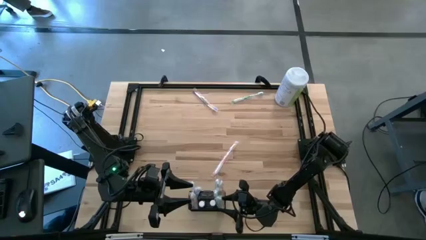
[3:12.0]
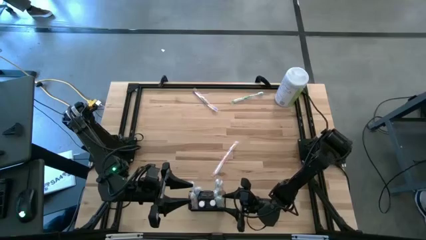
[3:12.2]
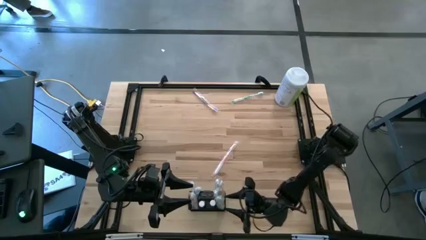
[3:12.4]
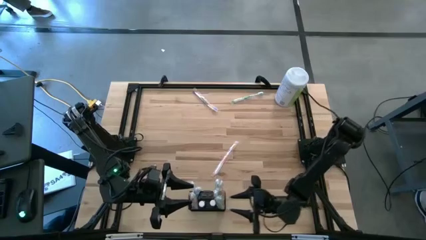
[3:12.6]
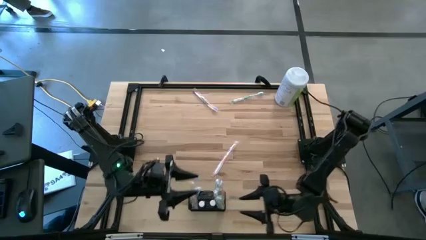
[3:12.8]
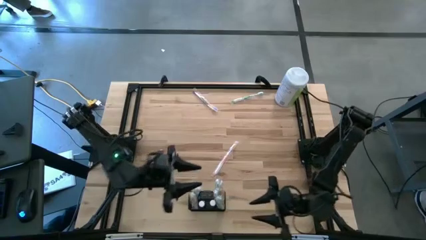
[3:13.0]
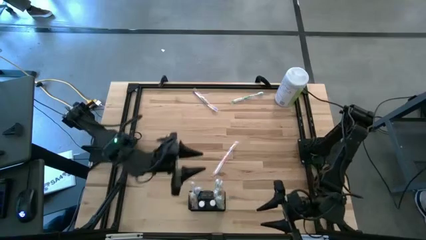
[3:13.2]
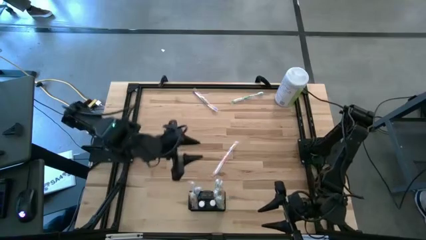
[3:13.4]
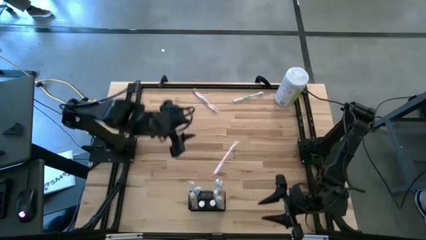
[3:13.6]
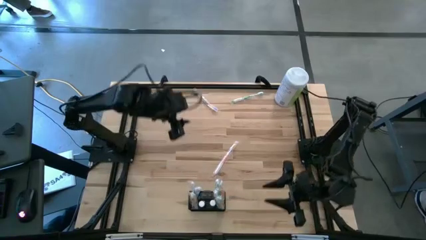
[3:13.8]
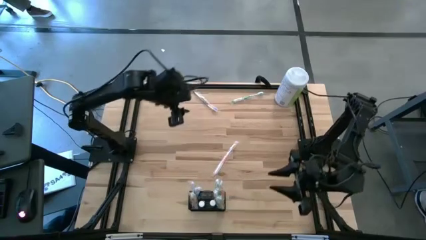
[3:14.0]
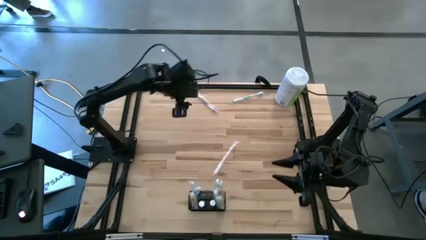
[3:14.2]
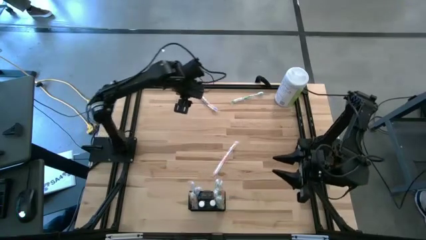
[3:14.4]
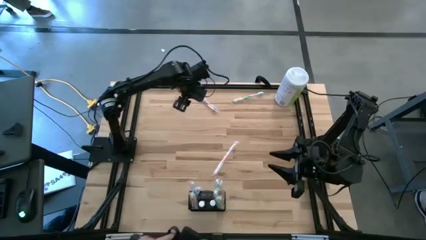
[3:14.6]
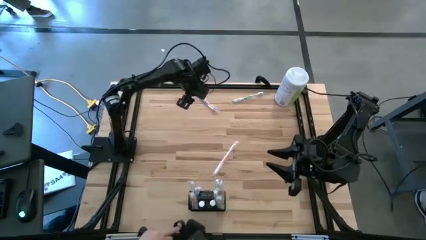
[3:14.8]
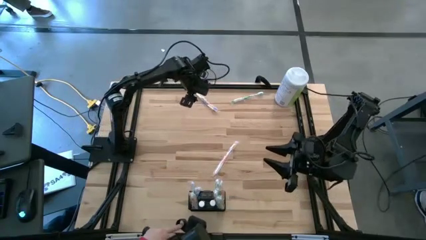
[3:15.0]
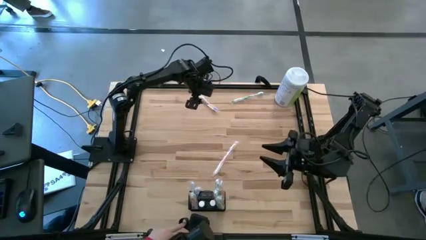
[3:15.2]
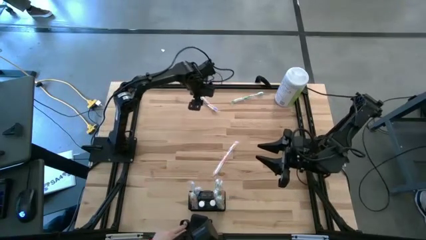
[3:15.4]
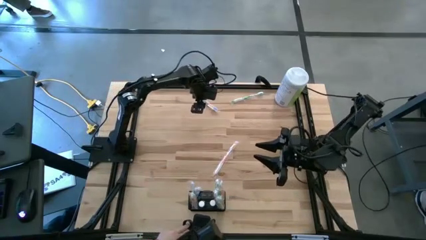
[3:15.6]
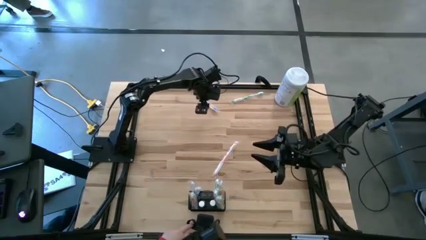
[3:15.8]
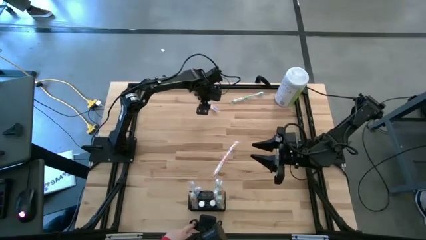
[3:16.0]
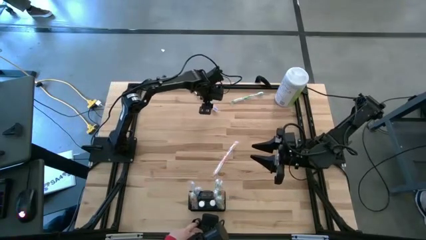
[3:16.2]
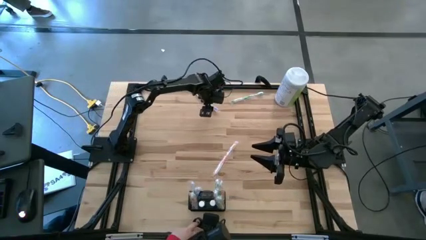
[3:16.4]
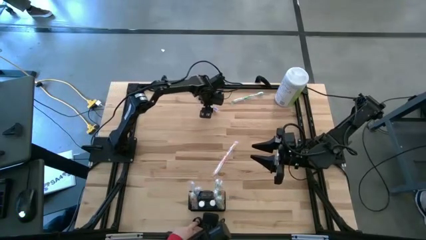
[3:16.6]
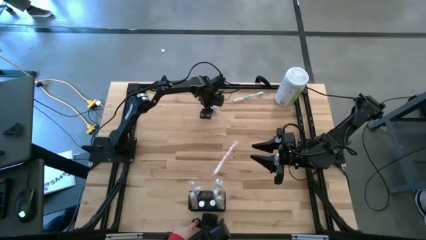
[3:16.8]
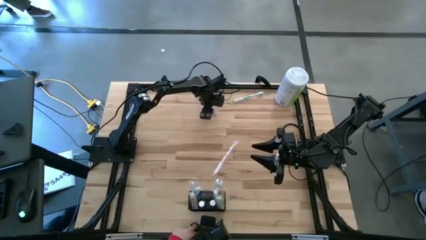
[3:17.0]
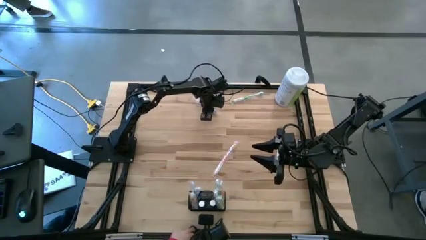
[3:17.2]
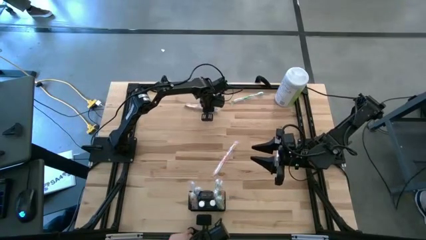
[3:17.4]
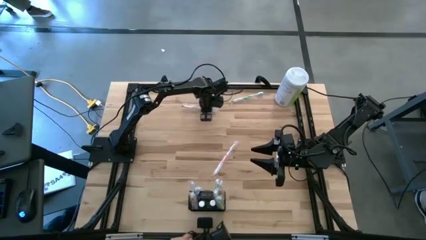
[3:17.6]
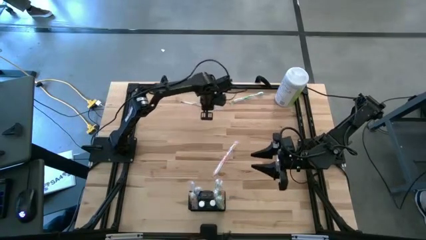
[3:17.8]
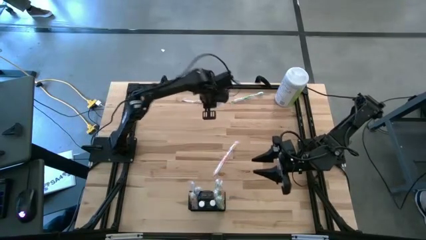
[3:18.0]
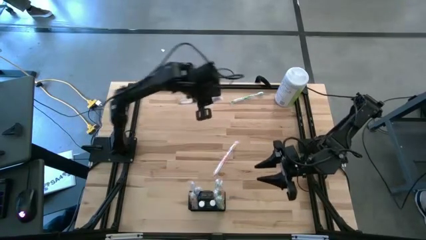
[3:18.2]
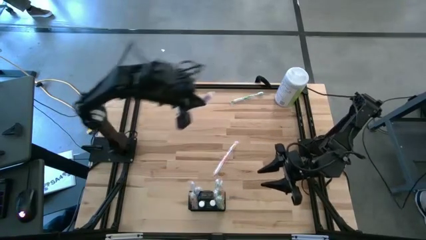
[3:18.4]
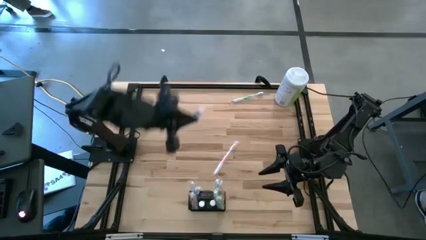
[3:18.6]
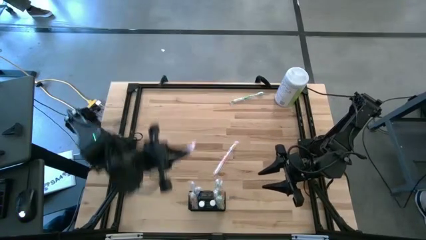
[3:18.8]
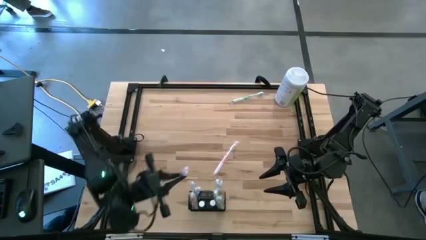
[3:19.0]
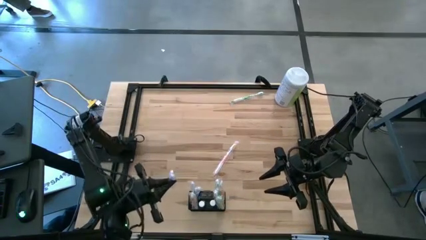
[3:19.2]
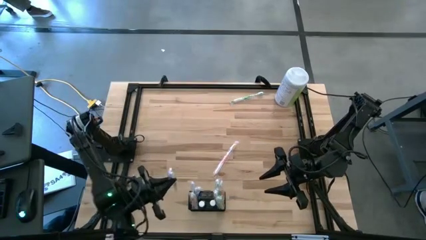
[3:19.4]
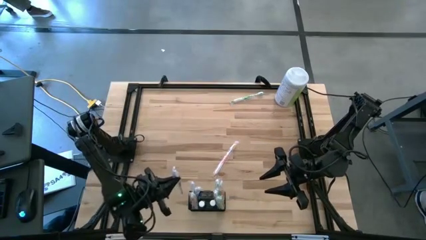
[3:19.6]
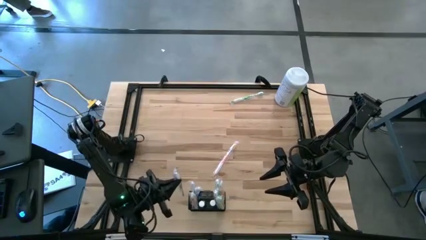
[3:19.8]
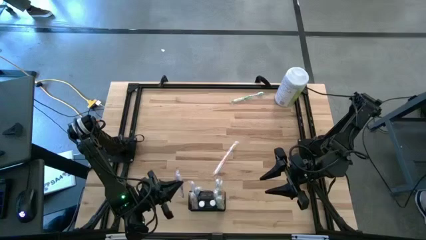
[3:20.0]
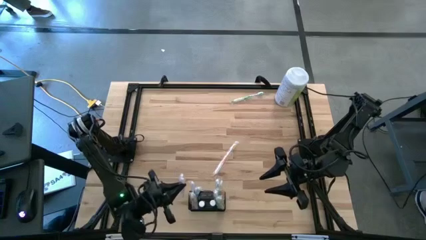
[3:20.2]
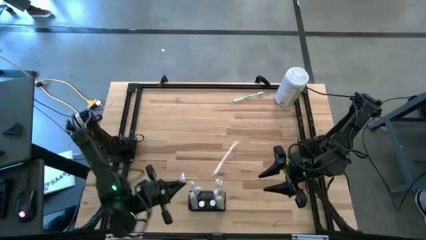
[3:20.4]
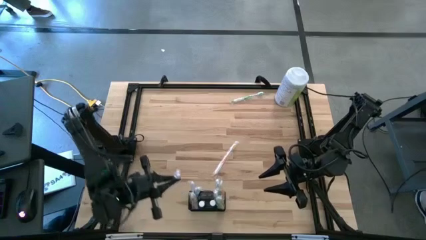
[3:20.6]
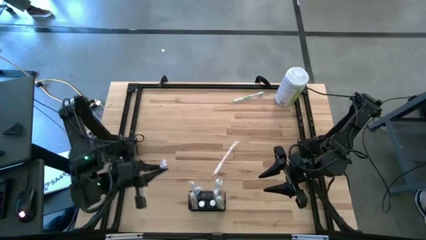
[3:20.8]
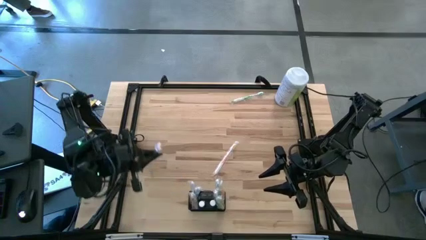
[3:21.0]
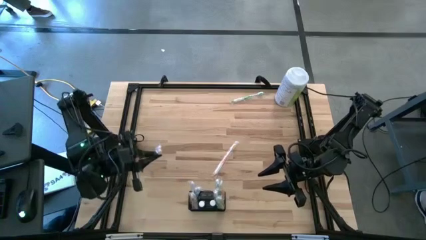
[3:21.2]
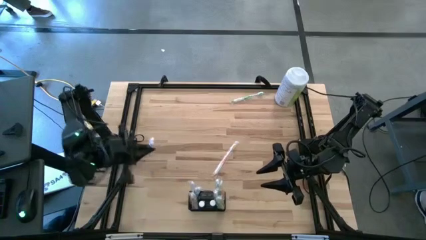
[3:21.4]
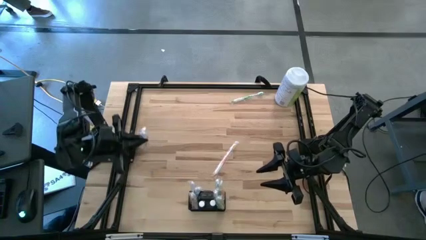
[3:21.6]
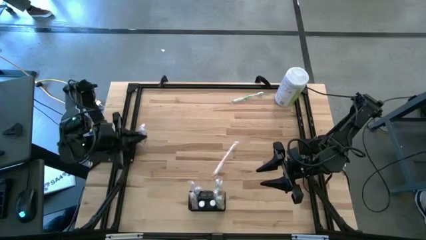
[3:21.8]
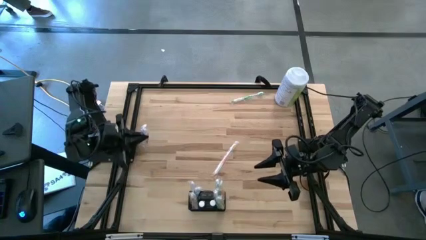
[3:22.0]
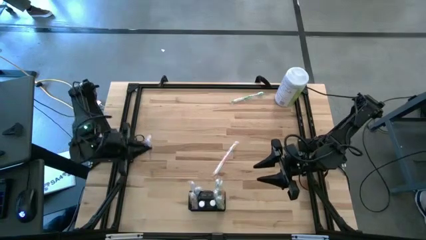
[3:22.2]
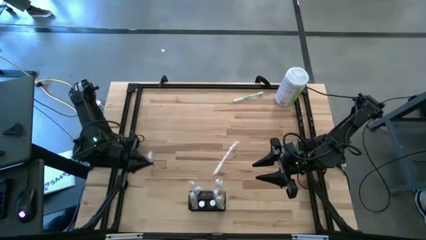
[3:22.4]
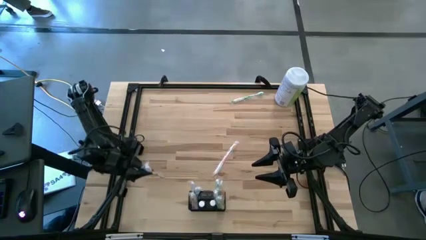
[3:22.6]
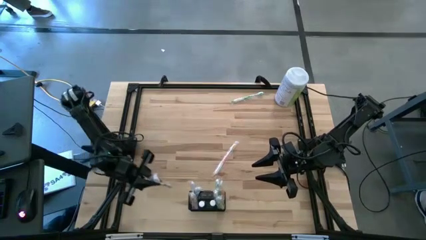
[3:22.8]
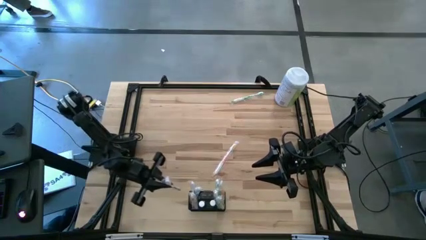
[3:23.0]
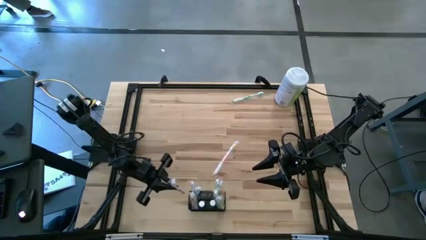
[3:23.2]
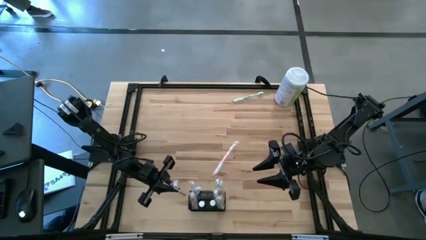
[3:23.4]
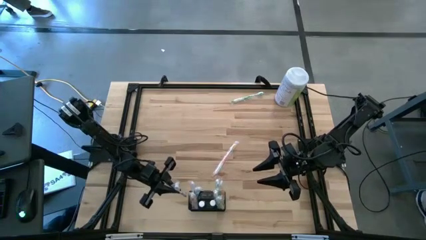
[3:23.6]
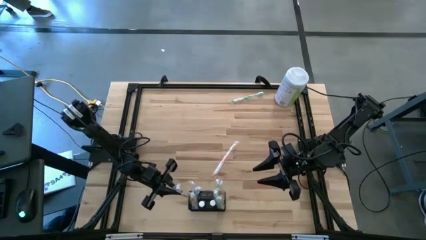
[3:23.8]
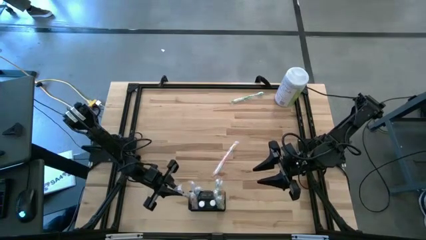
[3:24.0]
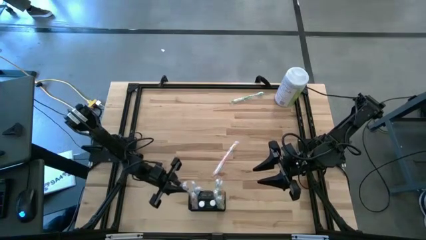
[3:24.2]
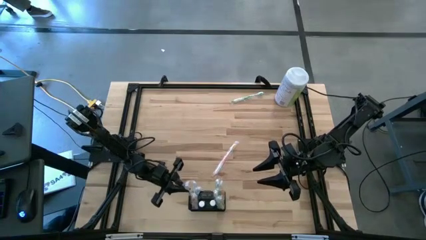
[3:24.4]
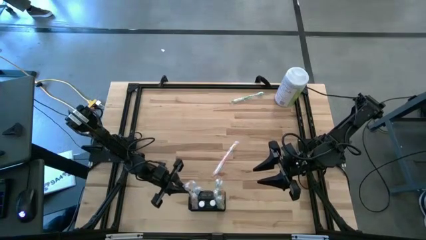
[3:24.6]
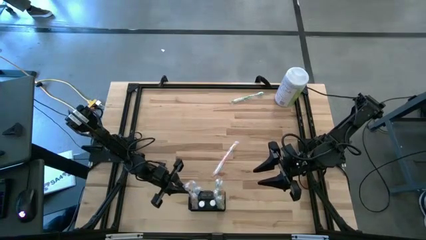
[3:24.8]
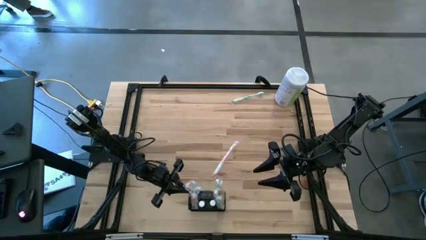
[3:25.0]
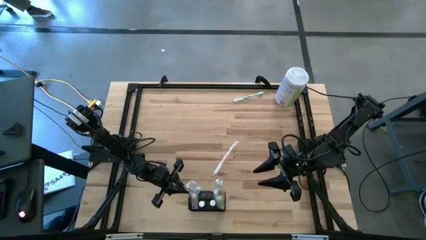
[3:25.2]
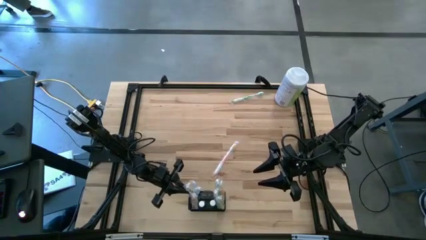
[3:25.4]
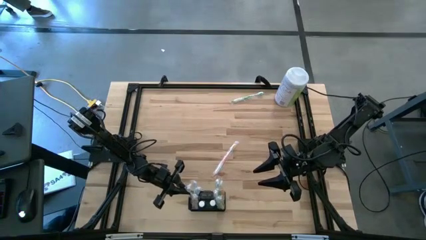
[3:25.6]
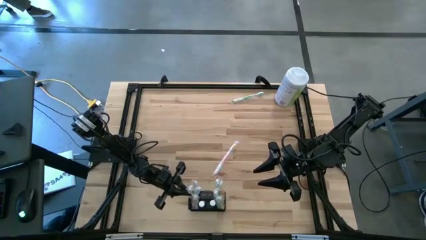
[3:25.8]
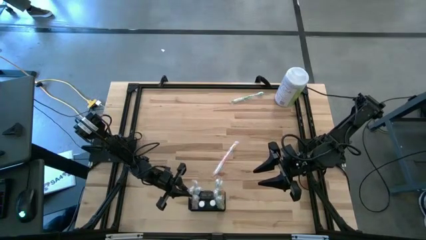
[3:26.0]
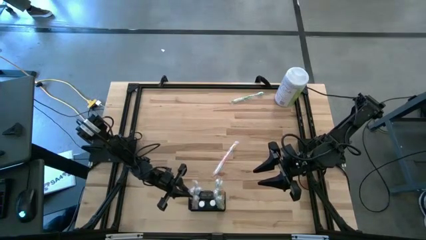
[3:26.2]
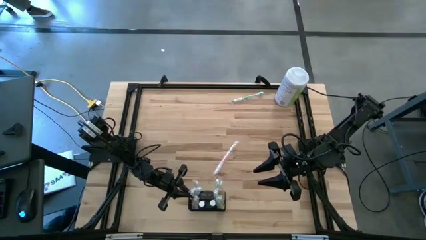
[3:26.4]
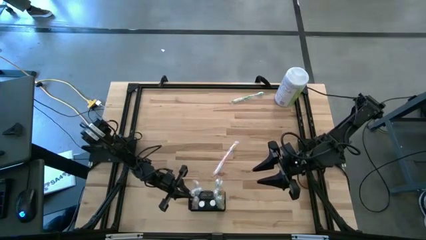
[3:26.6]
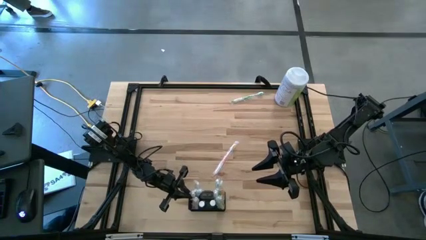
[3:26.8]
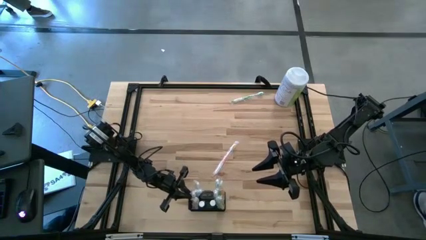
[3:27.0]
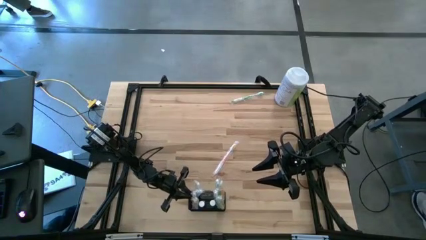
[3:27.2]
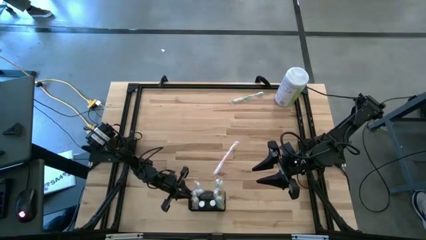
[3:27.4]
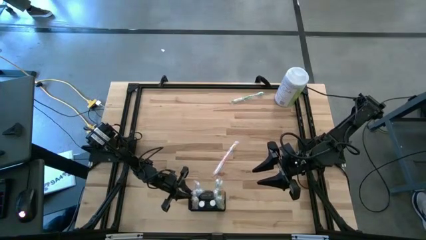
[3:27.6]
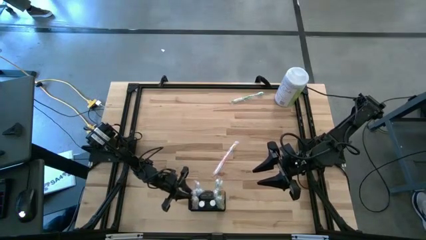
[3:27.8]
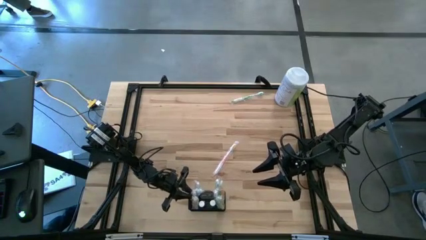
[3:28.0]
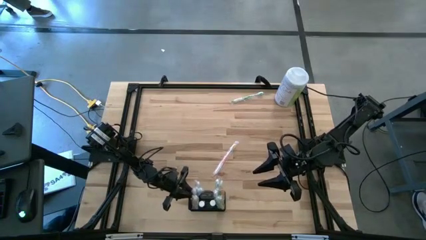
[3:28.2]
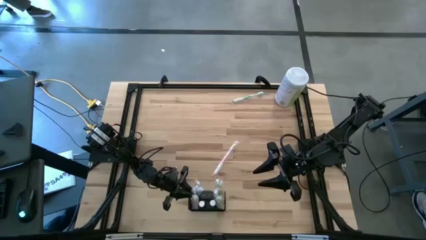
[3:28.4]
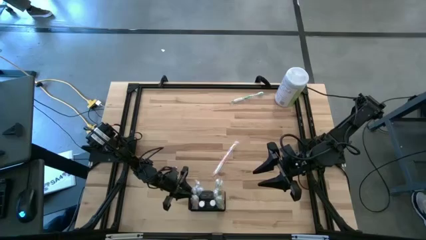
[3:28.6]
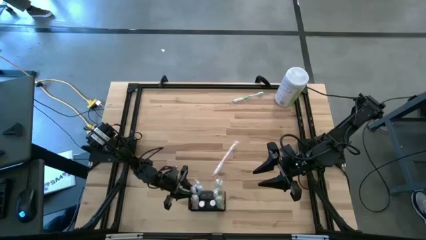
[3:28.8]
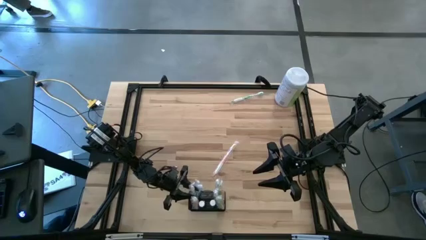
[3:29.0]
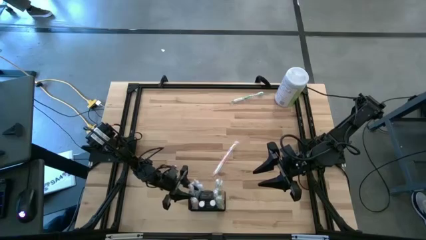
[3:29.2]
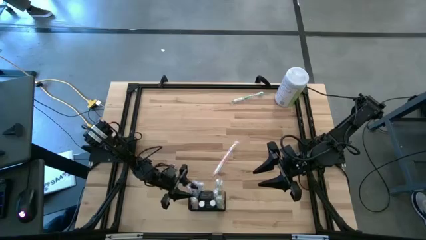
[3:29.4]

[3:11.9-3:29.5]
Task: Pick & Place toothbrushing station
Put the purple toothbrush into the black wire organizer
